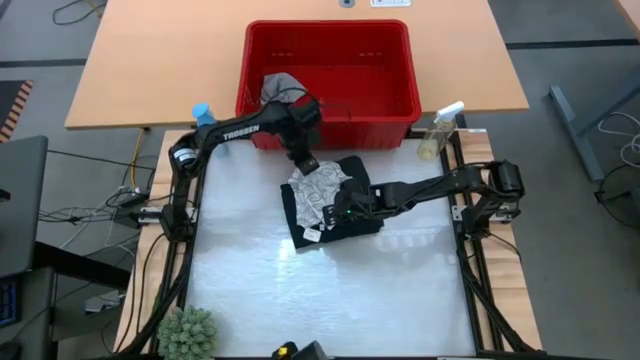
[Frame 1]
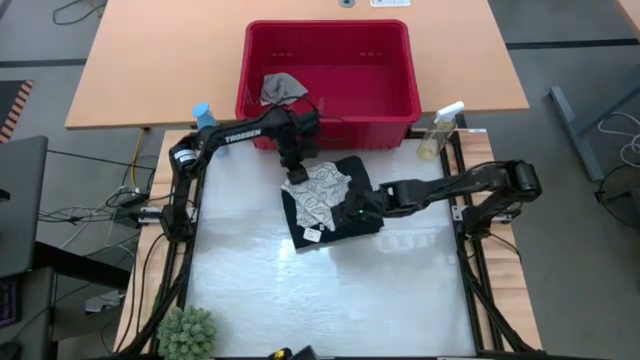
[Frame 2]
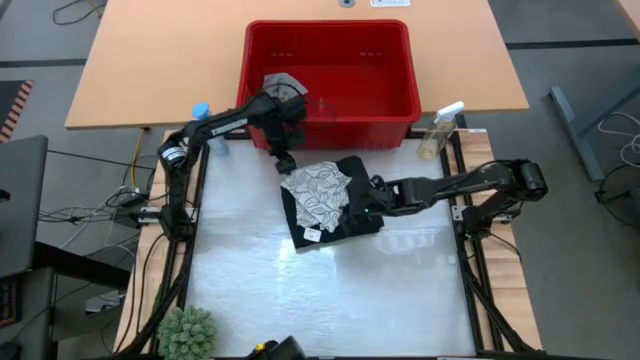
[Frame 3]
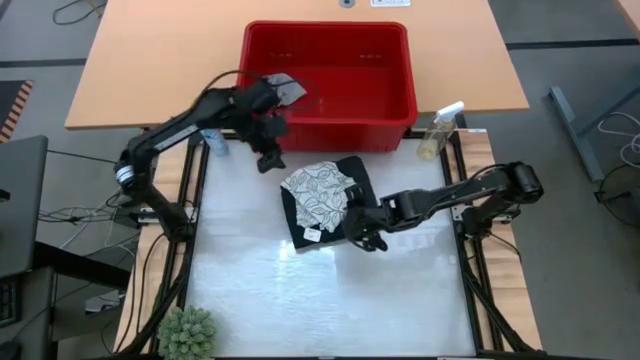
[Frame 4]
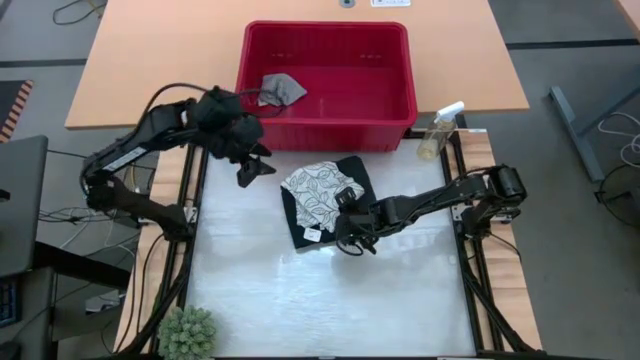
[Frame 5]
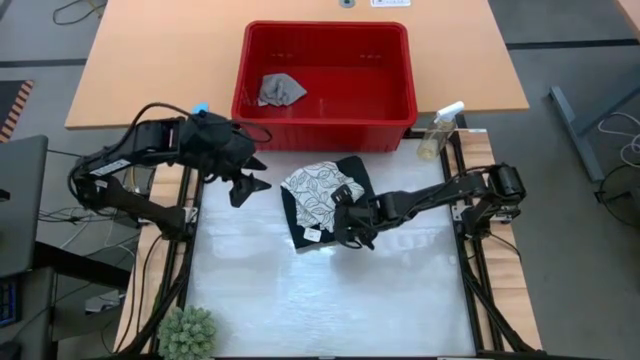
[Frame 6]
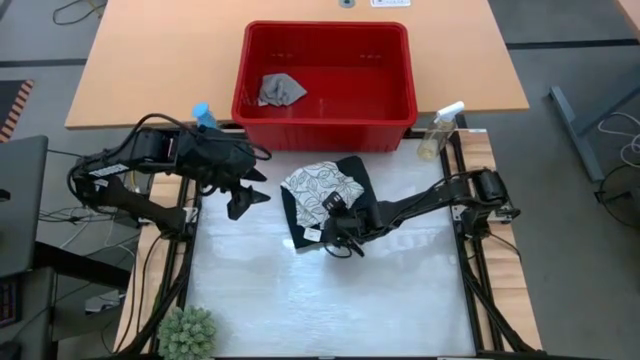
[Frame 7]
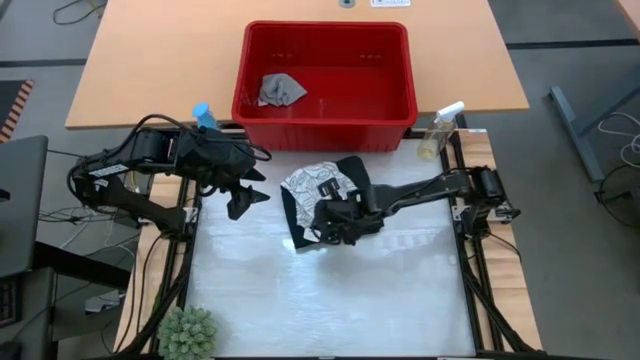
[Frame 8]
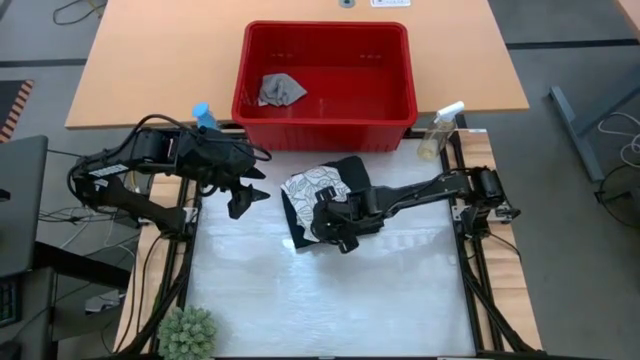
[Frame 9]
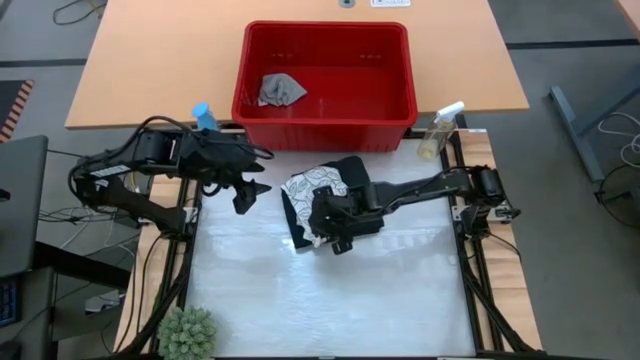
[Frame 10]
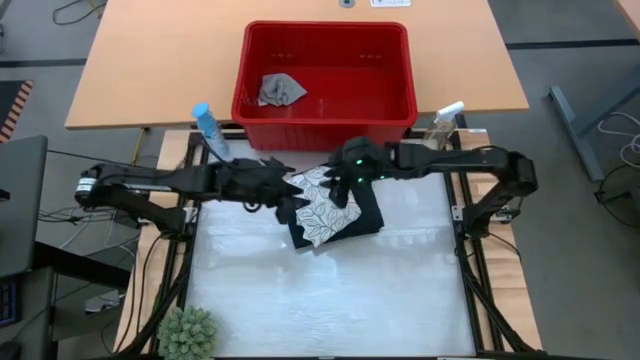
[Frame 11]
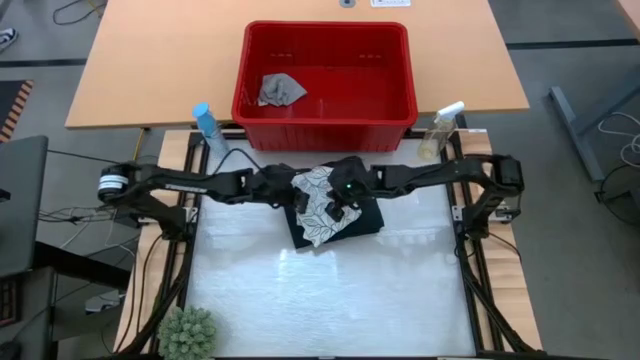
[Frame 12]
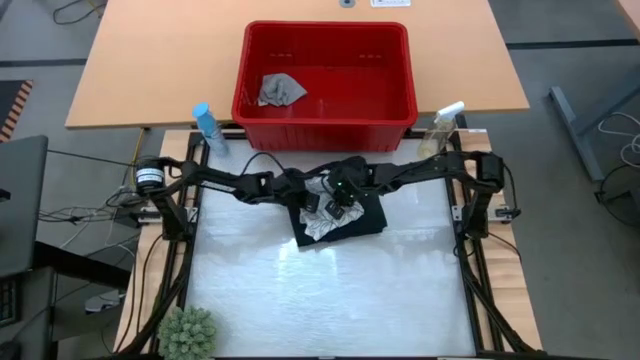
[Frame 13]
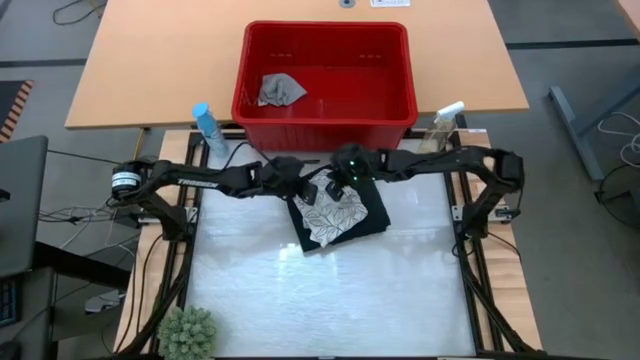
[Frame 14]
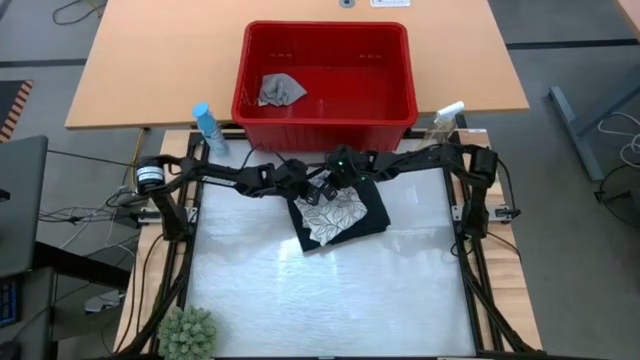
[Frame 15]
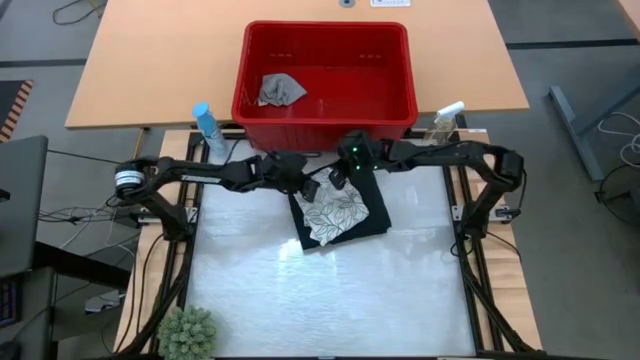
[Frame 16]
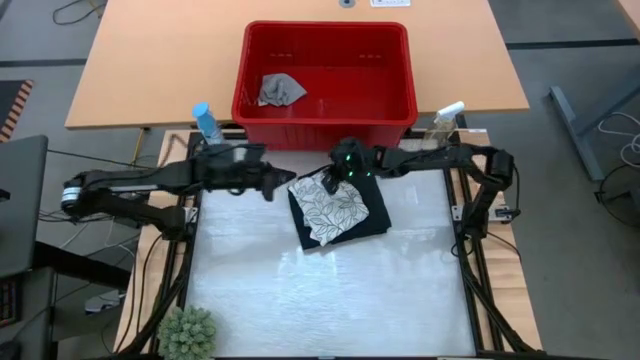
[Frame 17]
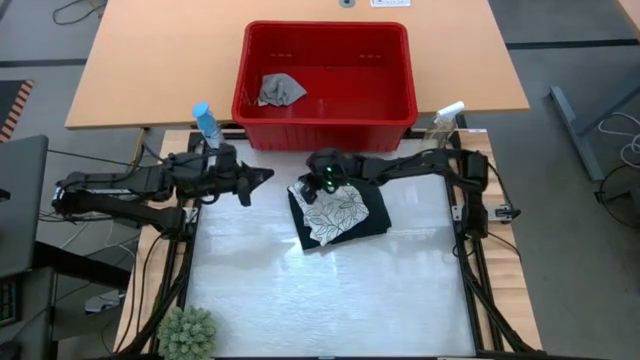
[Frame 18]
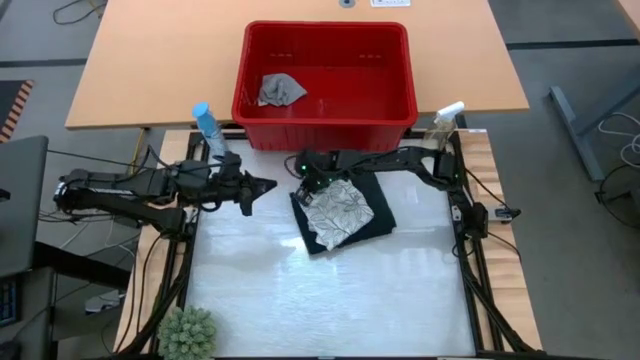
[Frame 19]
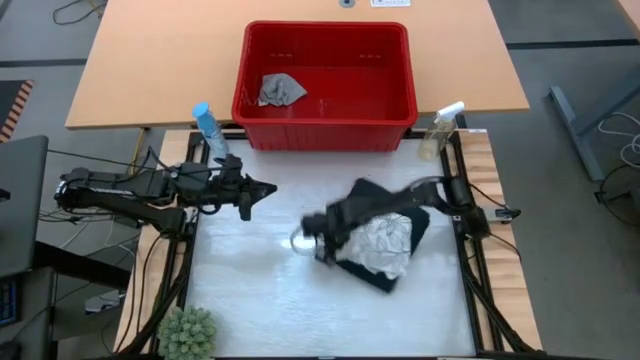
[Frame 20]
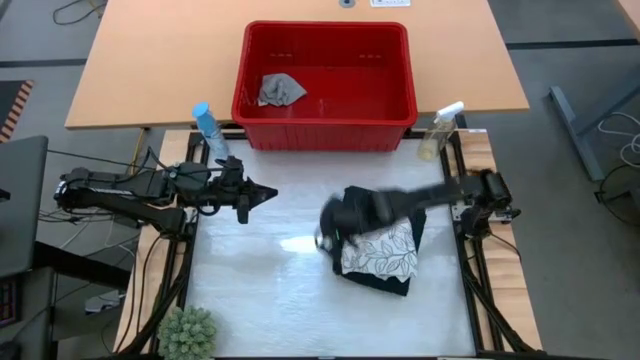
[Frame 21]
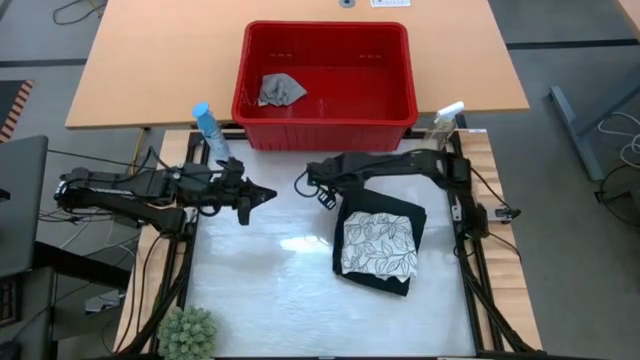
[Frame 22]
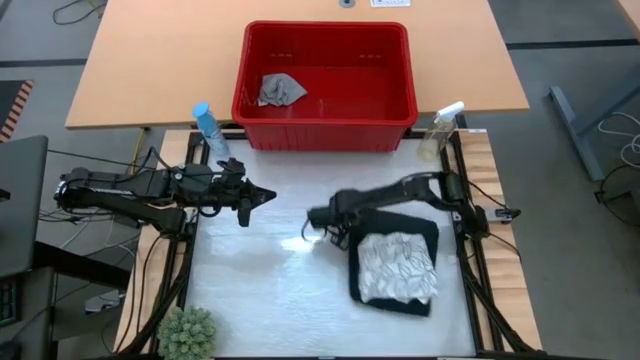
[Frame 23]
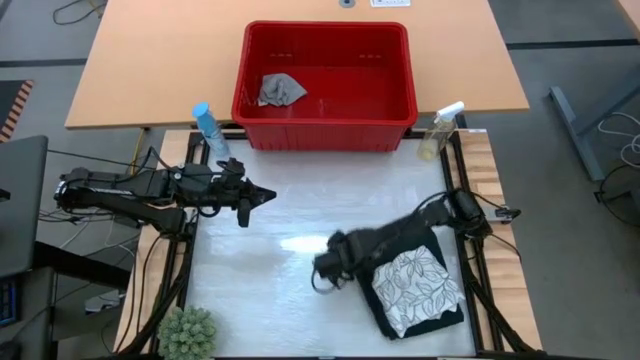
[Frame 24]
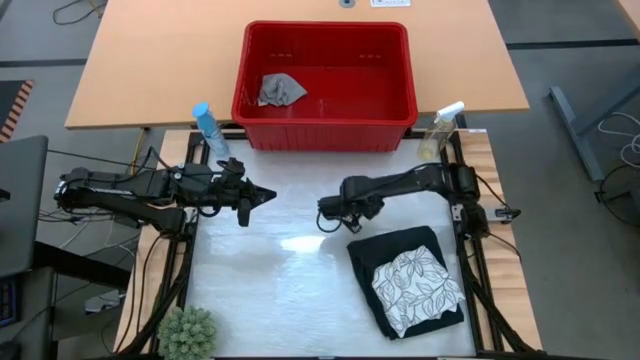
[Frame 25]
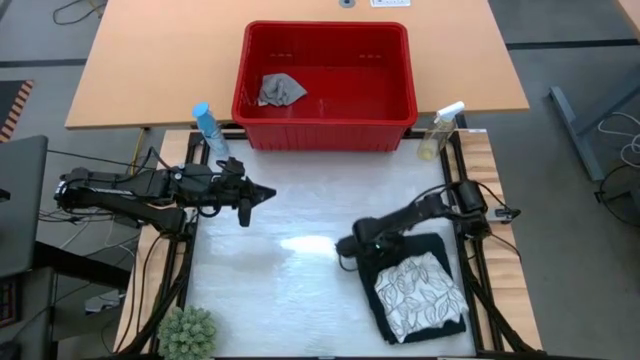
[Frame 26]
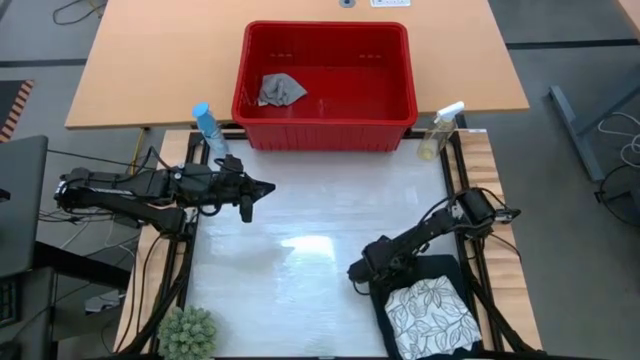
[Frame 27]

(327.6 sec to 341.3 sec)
Task: Fold laundry
Stack the white-patterned shirt on top of the dark blue pants

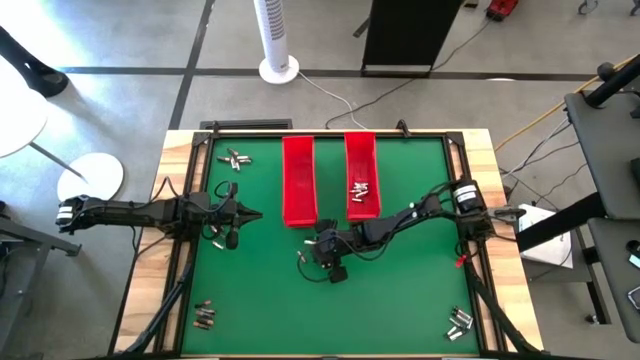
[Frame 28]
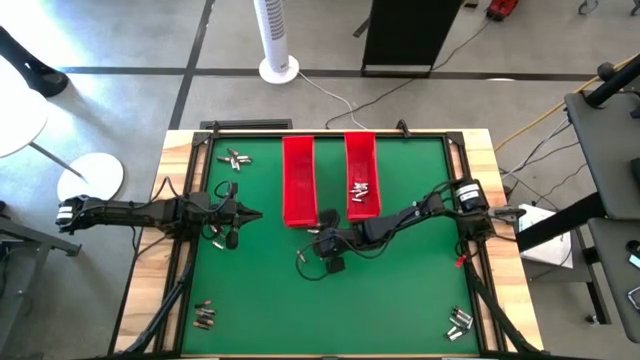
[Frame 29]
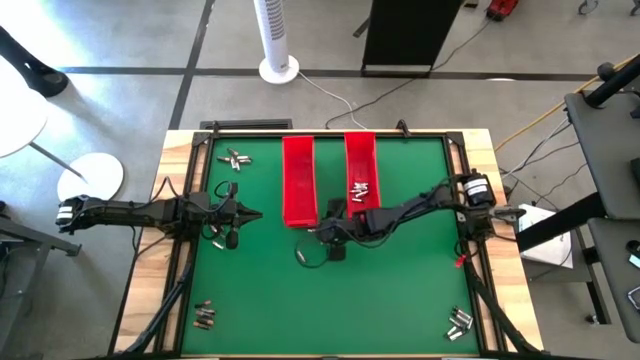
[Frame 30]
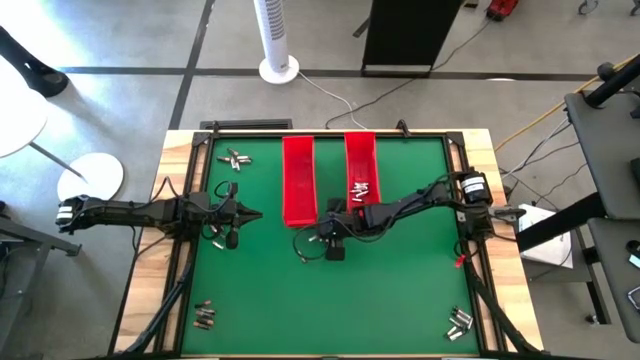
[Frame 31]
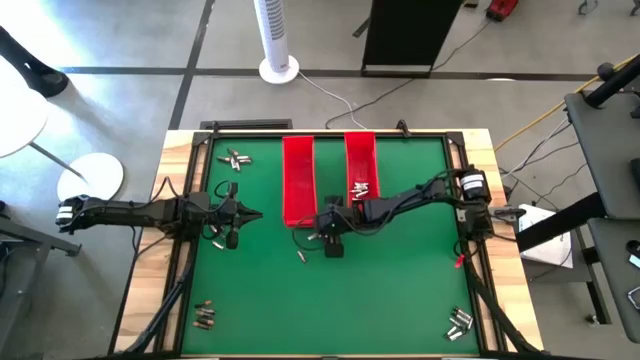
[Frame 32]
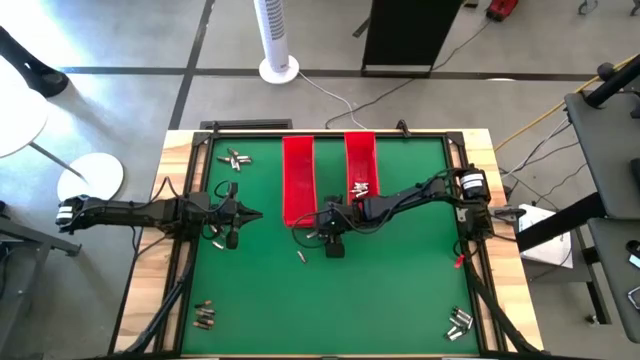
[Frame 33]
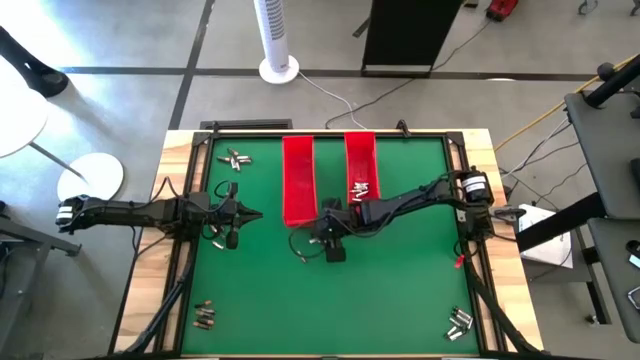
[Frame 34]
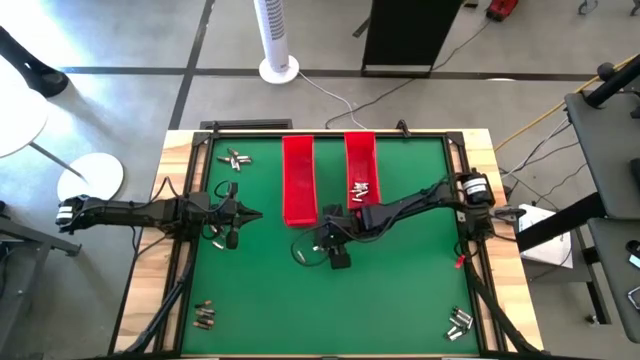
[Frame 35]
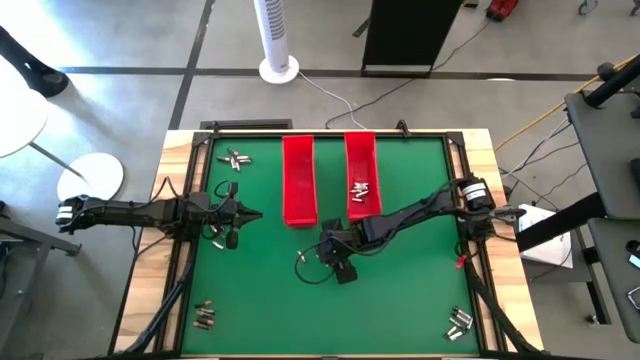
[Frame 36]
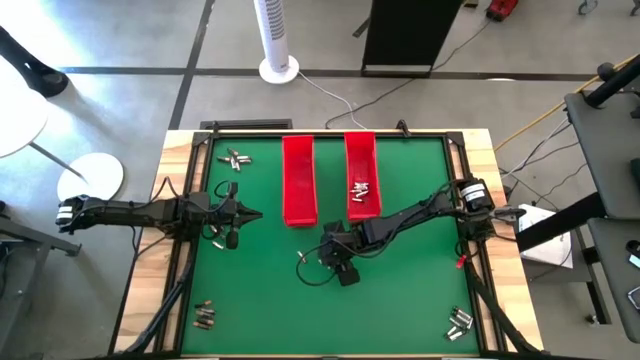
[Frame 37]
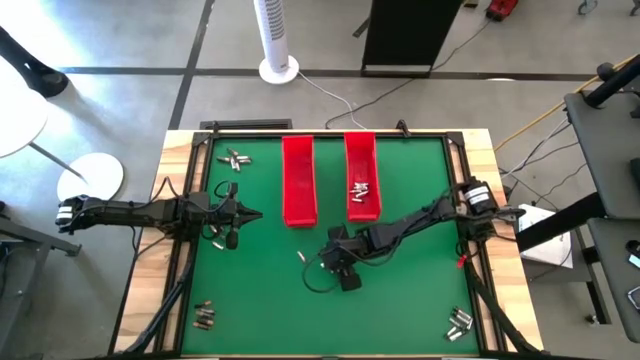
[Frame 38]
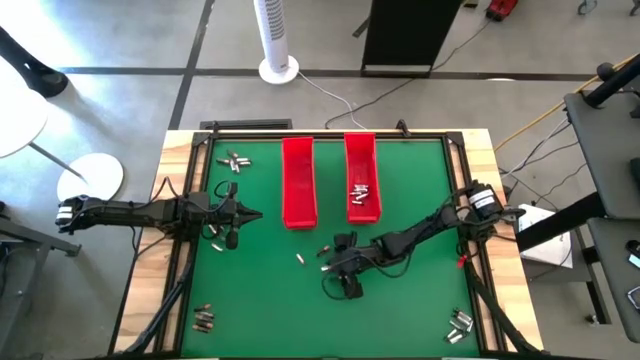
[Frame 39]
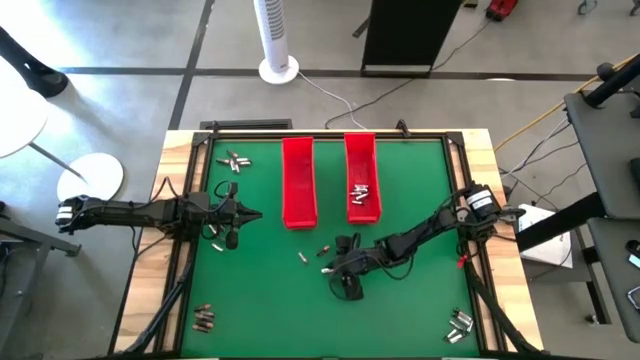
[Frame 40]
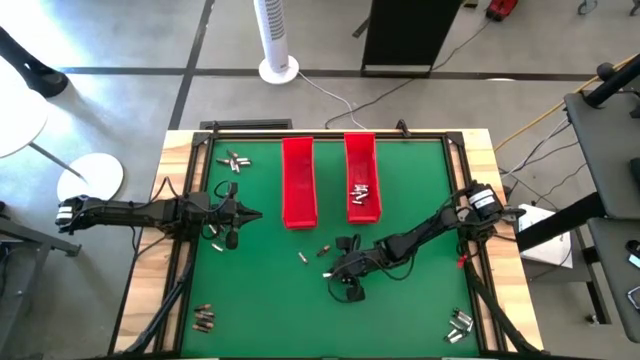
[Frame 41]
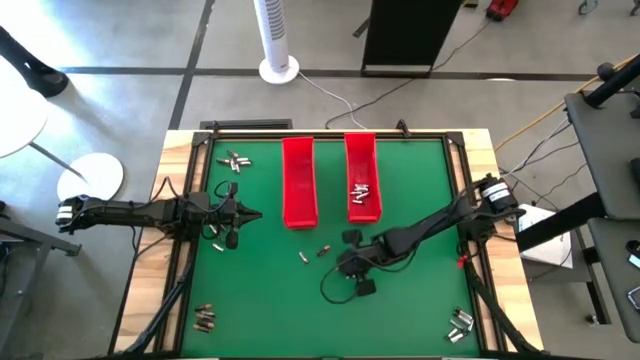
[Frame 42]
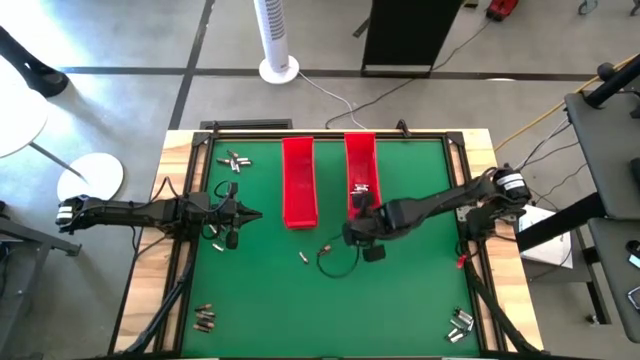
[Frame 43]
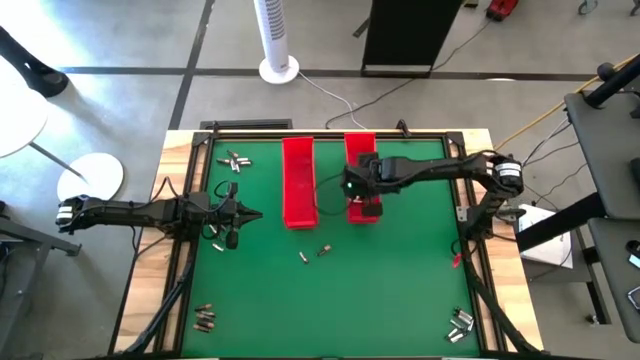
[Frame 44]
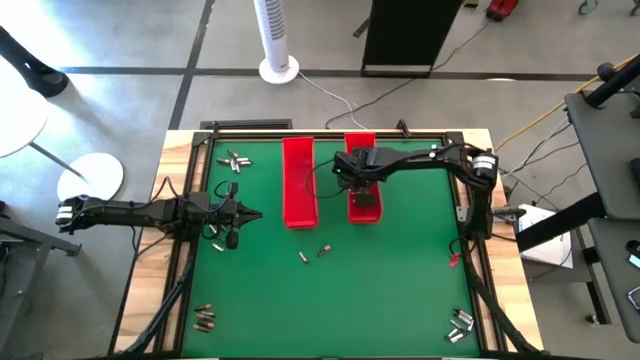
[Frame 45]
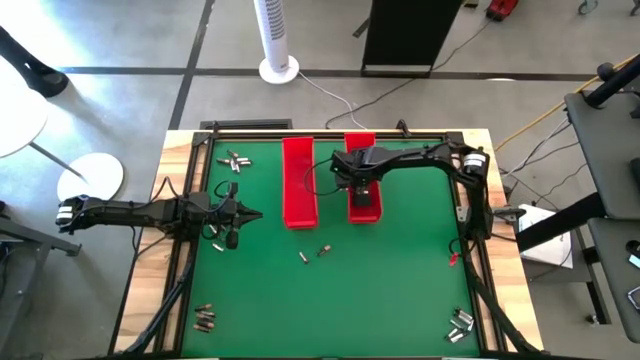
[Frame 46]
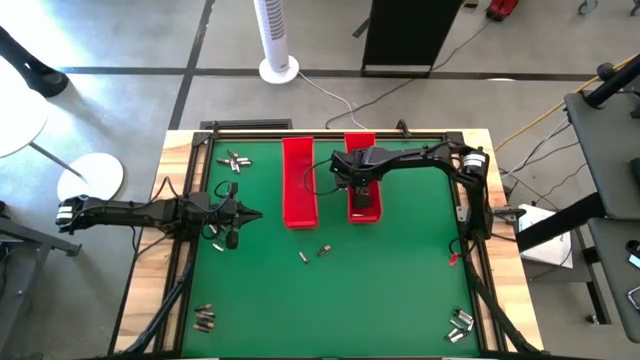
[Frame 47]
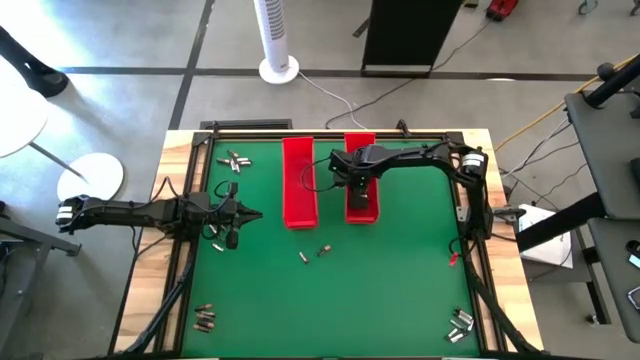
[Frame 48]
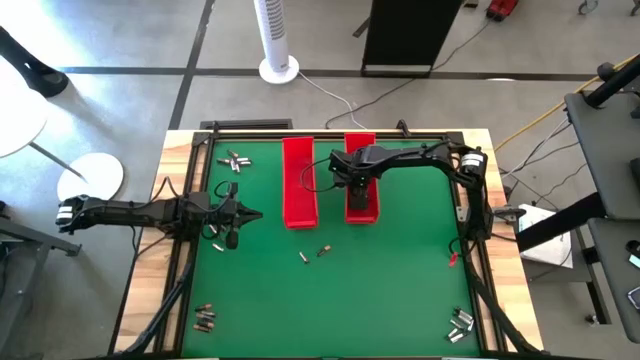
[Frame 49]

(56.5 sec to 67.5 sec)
Task: Sort batteries
Put the silver battery into the right red bin
